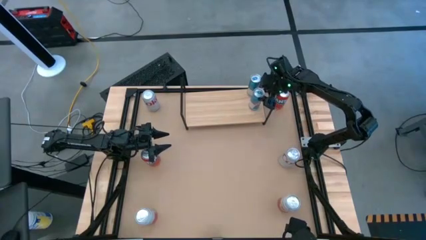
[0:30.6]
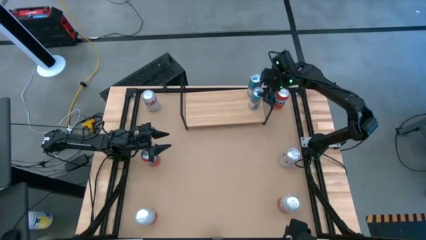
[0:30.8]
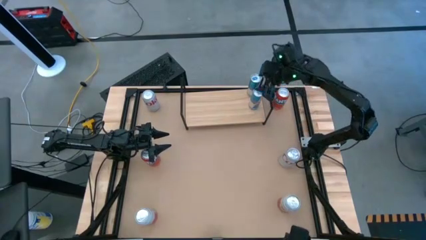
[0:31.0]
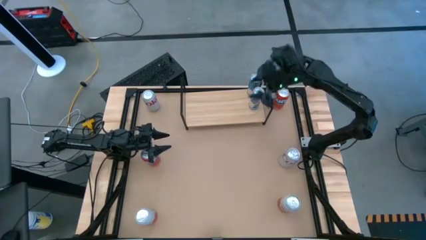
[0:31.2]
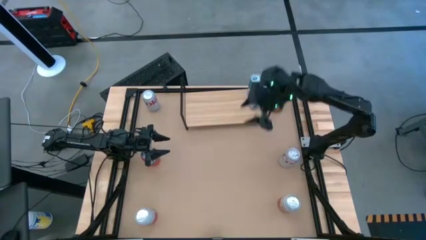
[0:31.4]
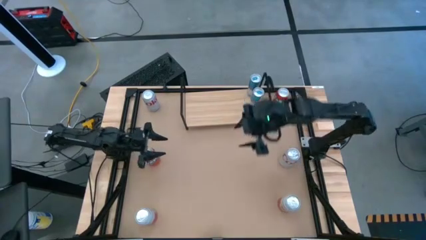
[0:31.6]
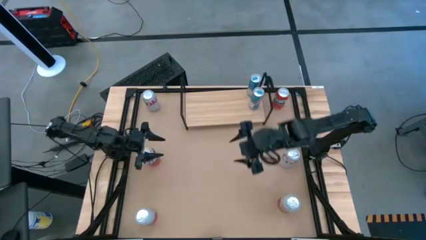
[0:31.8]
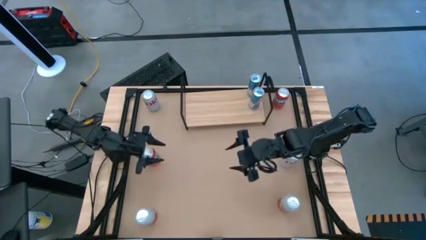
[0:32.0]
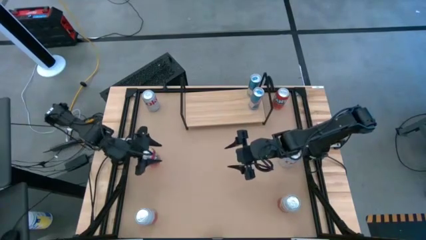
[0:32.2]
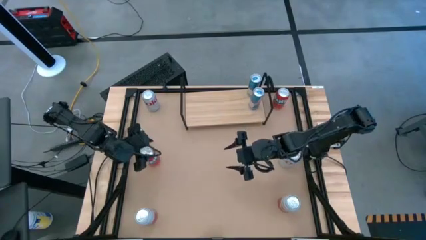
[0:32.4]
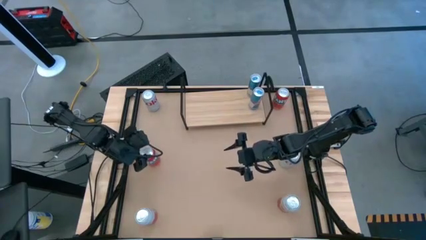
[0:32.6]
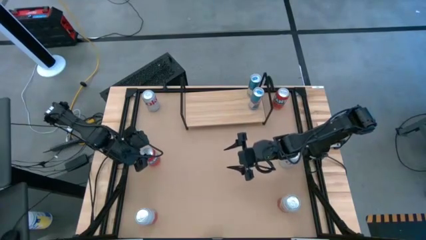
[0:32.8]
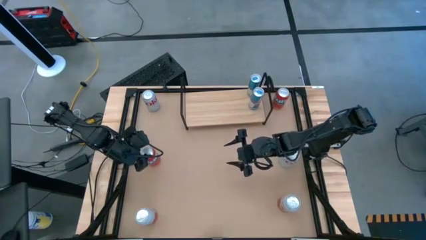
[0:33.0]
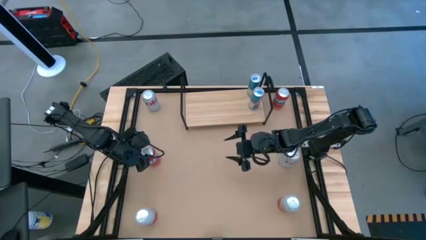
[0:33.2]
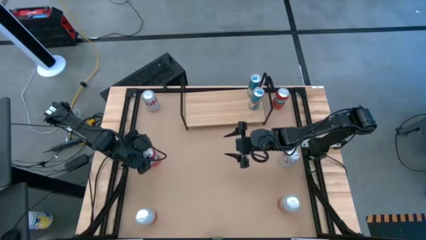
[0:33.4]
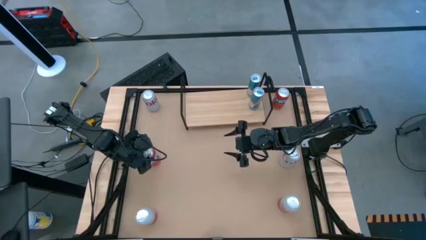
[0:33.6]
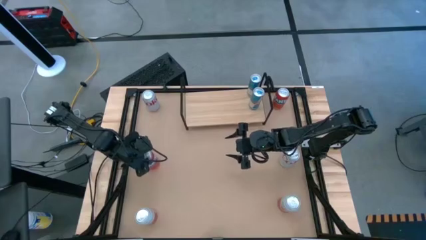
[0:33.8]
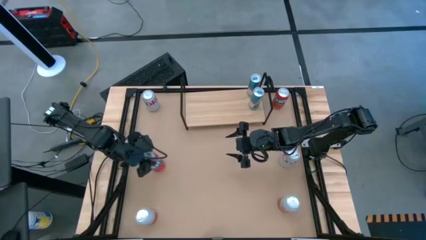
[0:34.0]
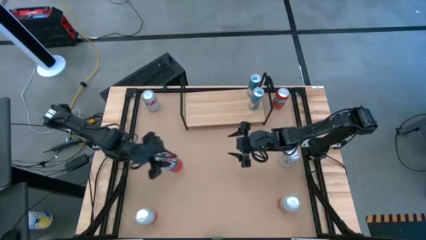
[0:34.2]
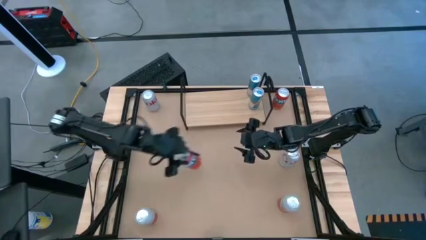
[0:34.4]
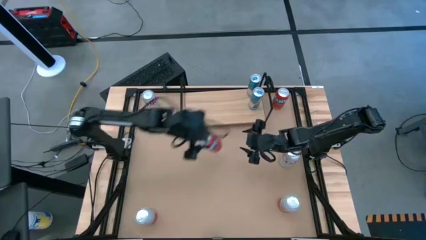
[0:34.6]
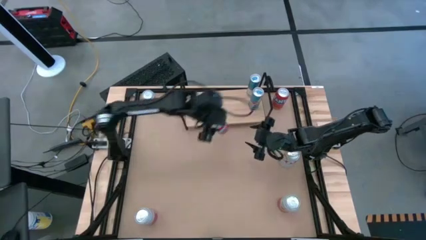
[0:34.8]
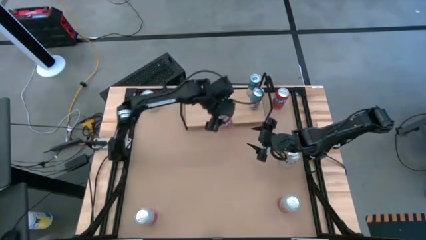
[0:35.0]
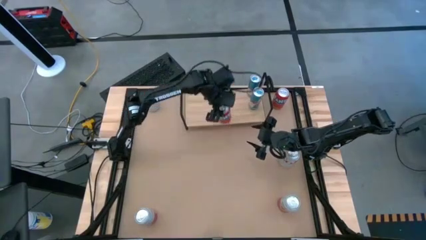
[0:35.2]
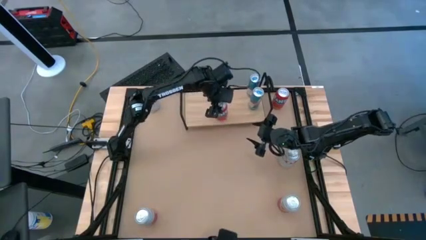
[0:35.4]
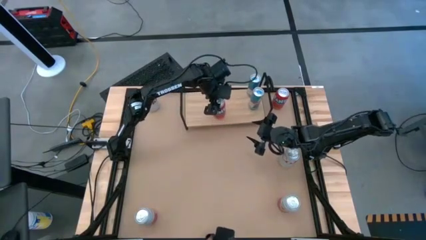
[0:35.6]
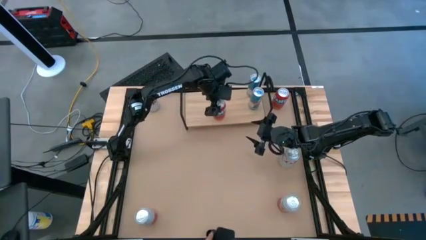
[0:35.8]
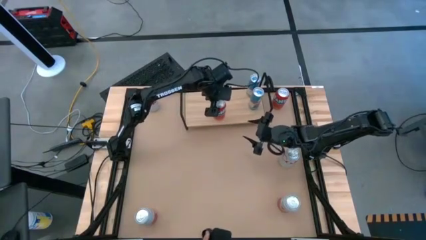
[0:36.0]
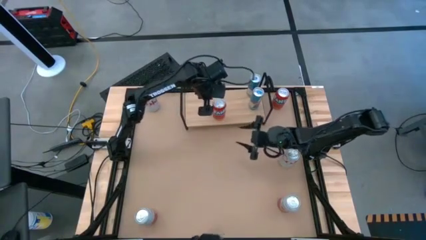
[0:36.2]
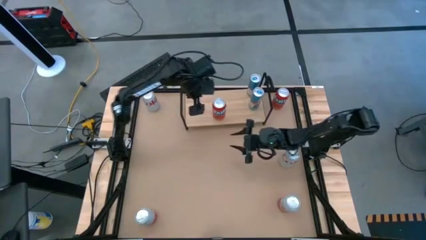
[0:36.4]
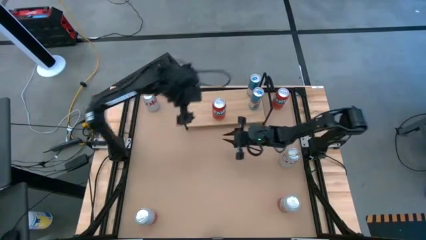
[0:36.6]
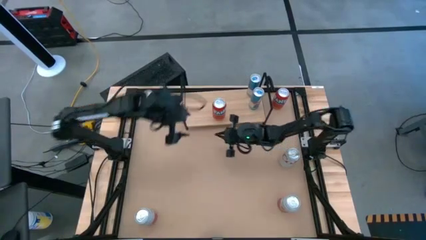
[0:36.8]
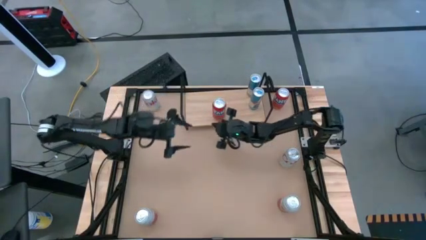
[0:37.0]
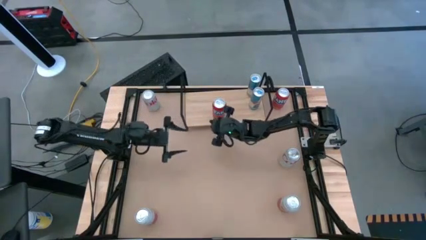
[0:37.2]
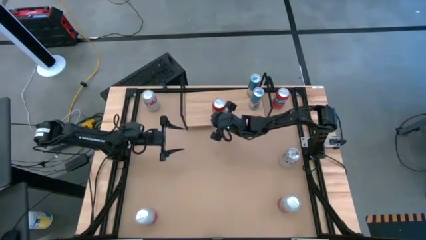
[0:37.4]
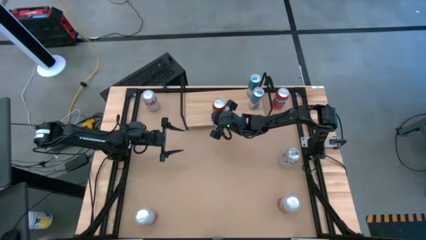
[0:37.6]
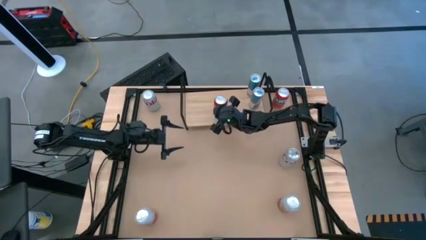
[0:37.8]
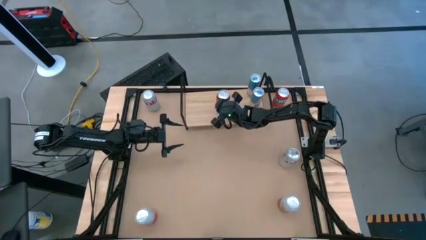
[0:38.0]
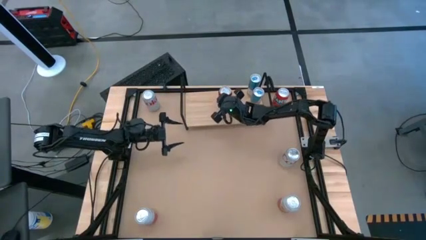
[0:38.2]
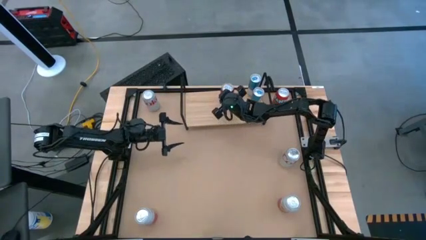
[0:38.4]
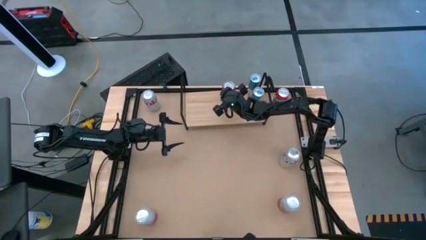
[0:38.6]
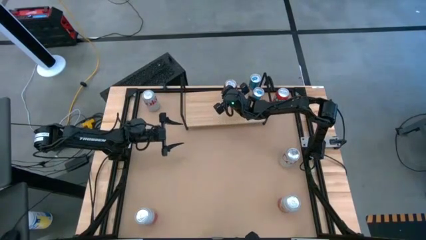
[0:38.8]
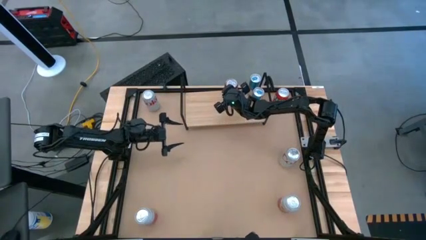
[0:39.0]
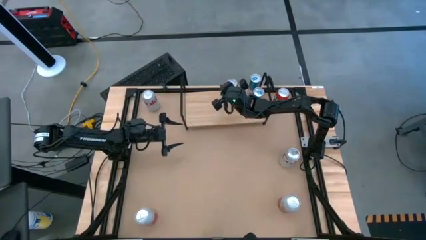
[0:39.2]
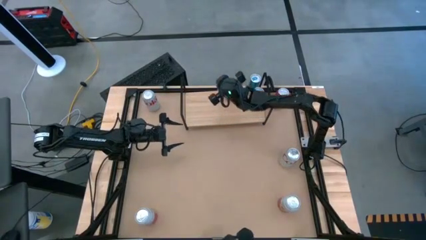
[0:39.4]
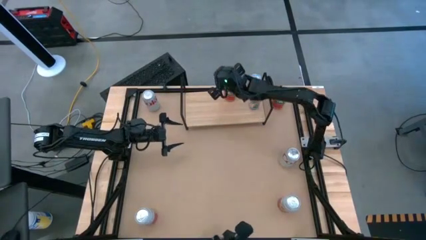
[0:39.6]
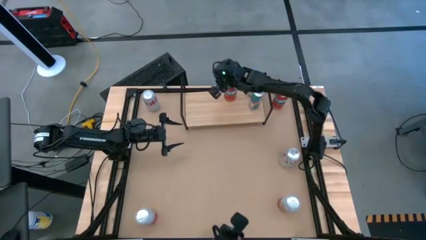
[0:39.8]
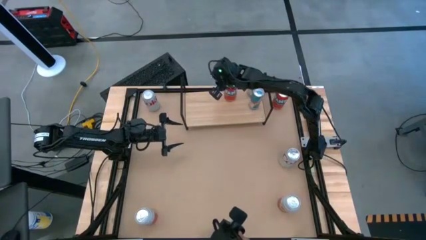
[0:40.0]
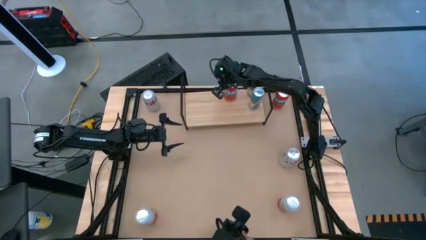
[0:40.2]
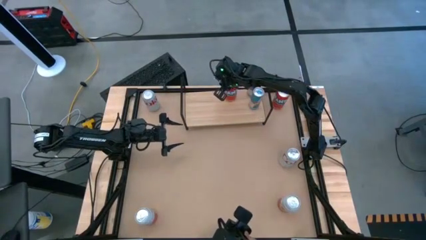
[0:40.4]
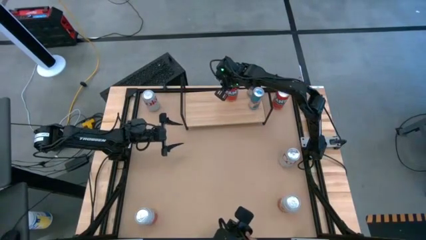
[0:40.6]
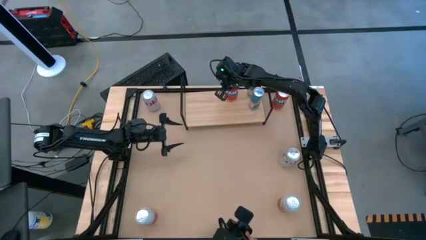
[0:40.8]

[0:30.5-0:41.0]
Task: Place canned beverage on shelf
Put the left orange soda can on the shelf

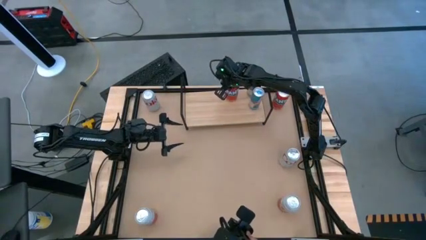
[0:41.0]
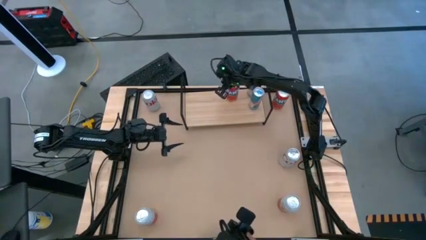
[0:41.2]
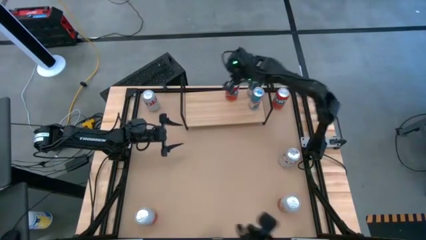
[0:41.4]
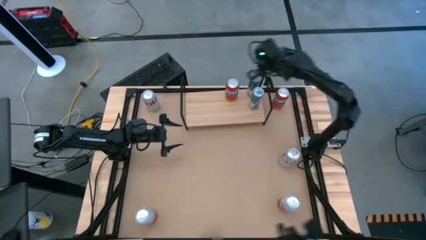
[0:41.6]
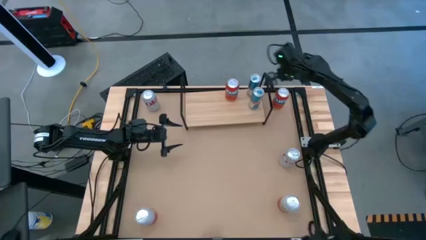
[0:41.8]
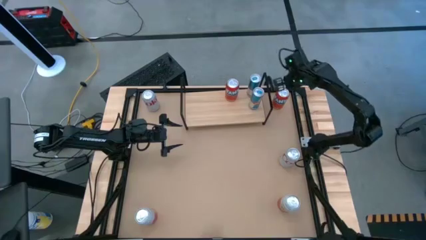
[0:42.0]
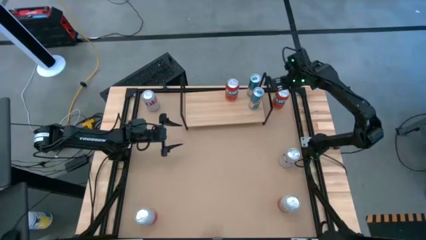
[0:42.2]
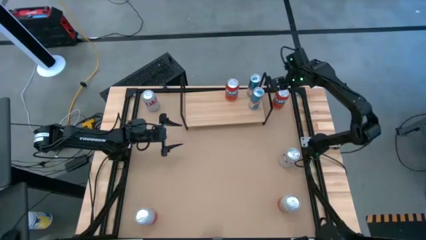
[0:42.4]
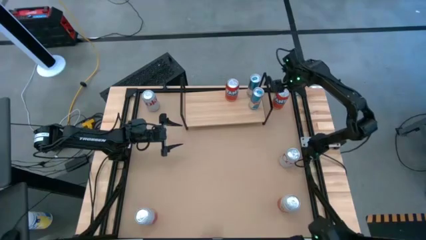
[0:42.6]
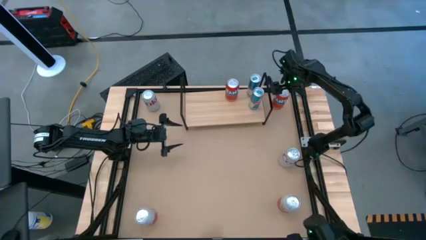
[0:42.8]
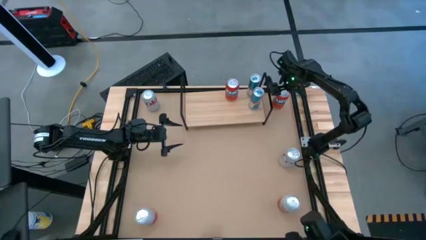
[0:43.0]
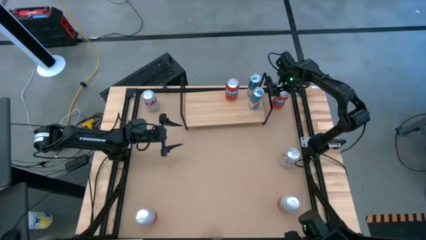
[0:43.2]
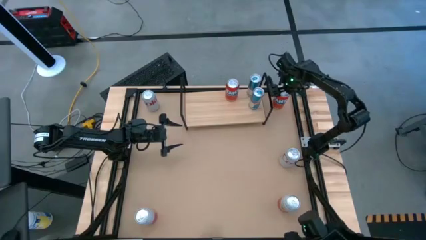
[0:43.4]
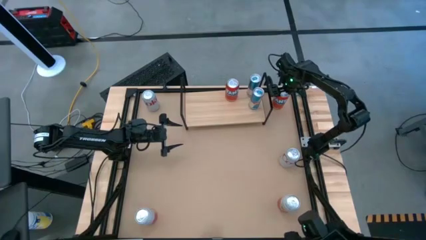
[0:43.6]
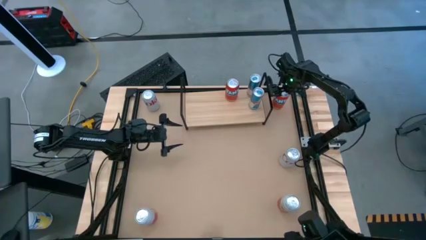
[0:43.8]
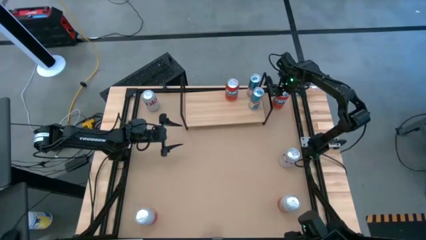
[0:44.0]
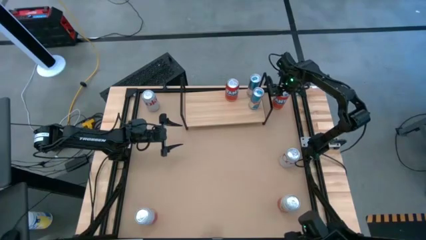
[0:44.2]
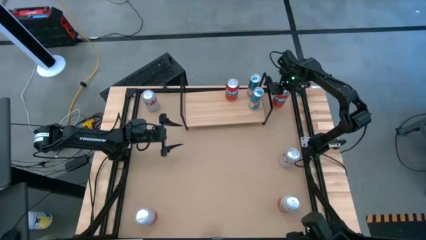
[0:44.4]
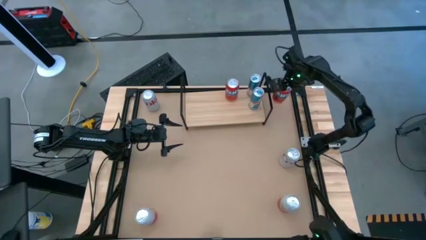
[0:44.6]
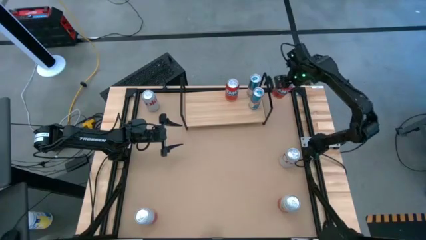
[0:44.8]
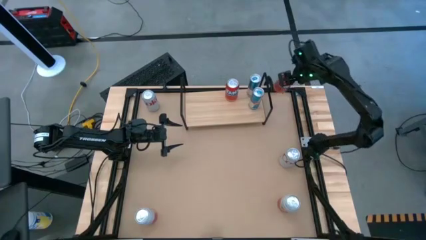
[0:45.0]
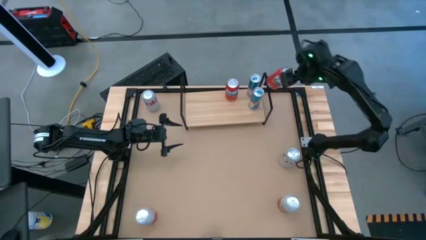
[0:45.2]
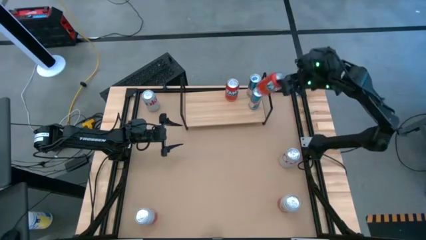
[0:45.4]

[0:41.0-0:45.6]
Put the orange soda can on the shelf aligned with the other orange soda can on the shelf
